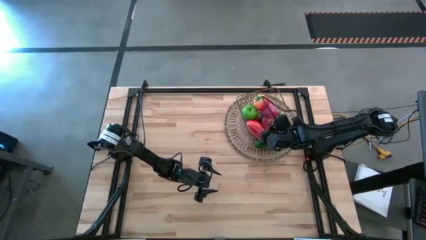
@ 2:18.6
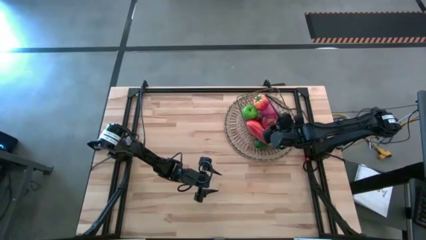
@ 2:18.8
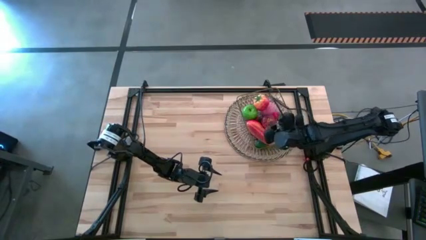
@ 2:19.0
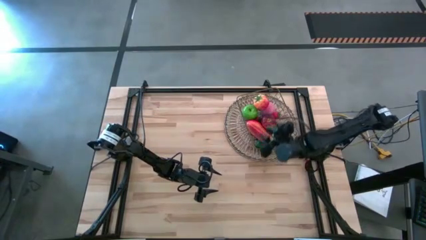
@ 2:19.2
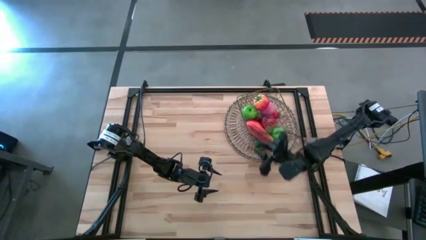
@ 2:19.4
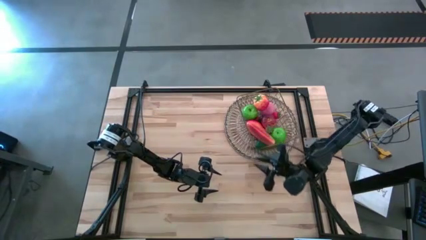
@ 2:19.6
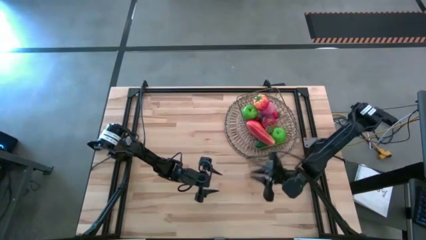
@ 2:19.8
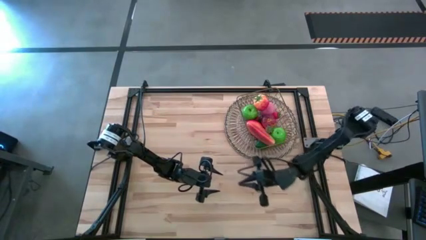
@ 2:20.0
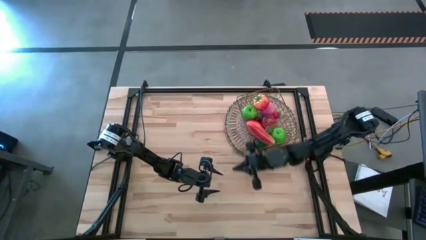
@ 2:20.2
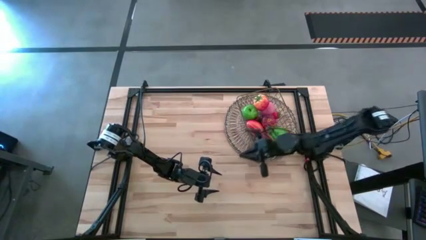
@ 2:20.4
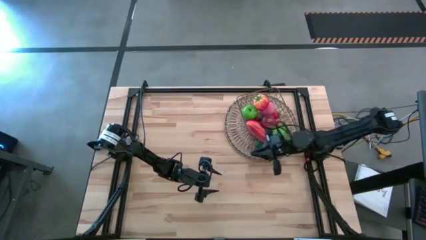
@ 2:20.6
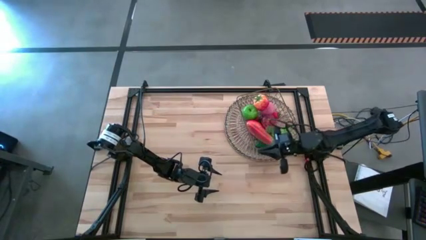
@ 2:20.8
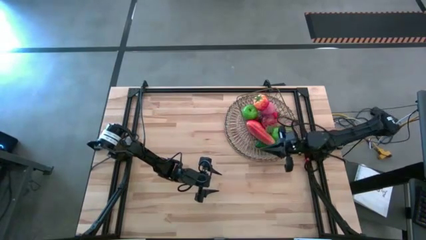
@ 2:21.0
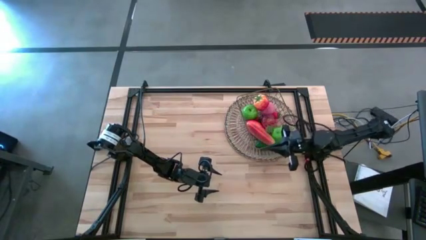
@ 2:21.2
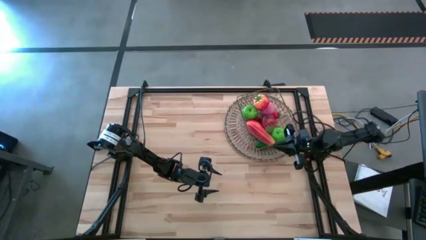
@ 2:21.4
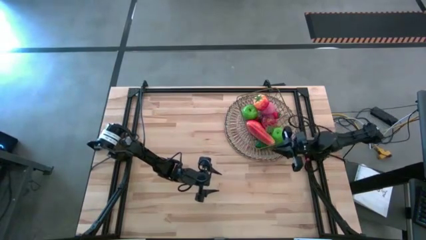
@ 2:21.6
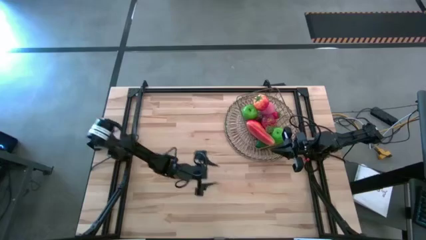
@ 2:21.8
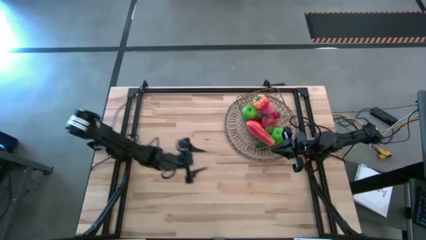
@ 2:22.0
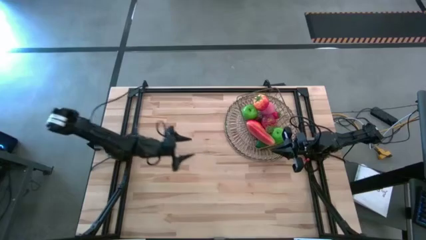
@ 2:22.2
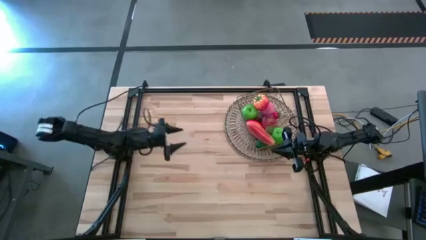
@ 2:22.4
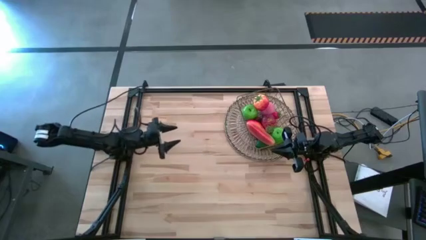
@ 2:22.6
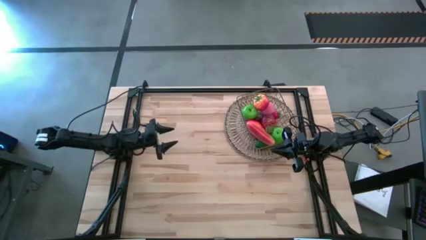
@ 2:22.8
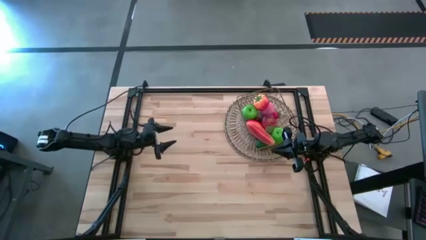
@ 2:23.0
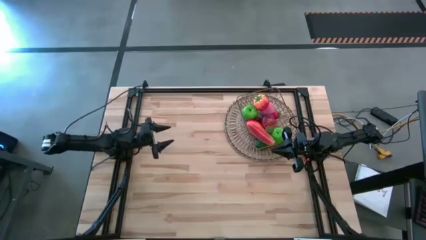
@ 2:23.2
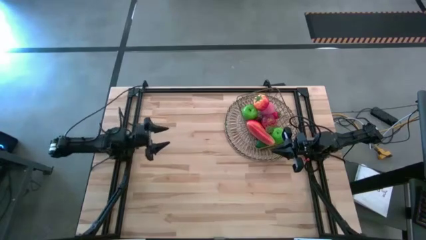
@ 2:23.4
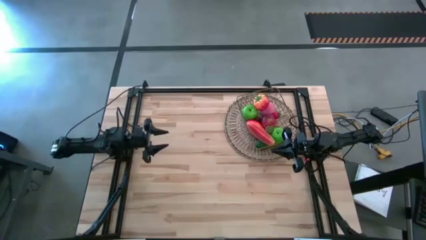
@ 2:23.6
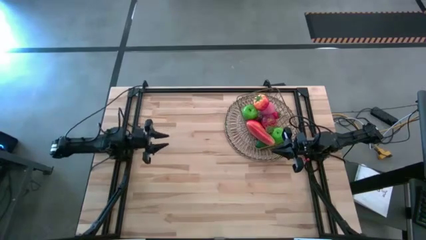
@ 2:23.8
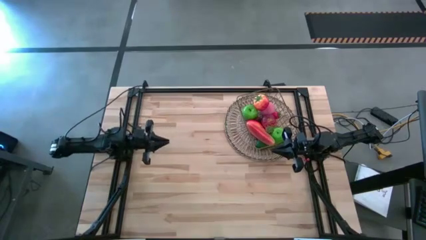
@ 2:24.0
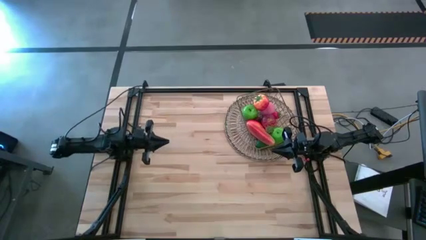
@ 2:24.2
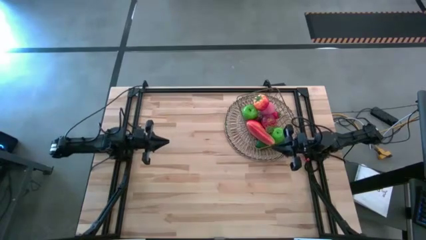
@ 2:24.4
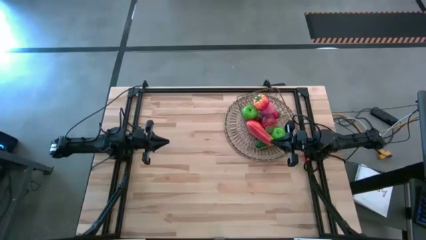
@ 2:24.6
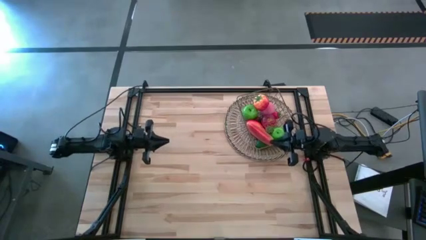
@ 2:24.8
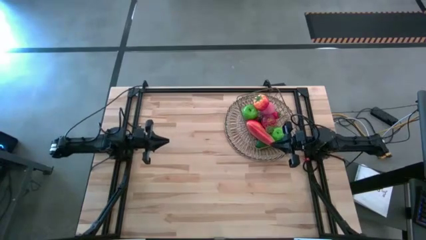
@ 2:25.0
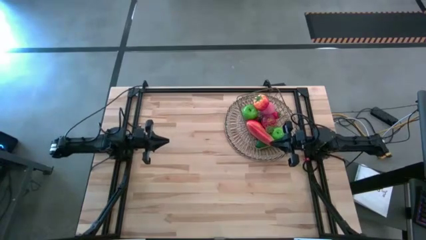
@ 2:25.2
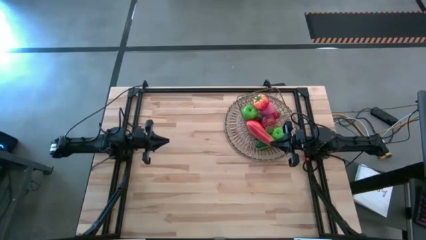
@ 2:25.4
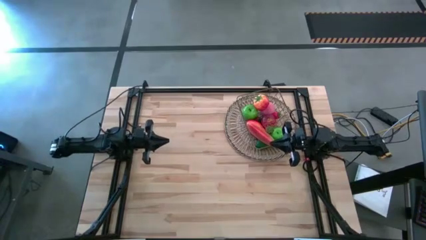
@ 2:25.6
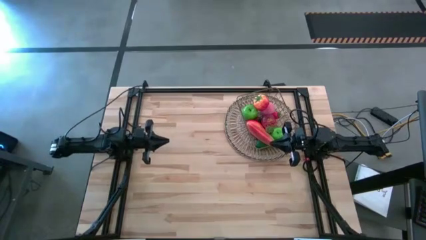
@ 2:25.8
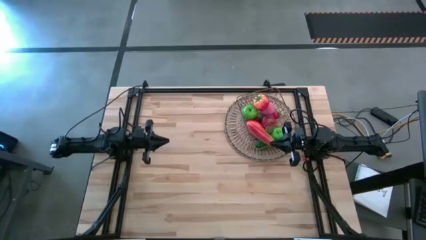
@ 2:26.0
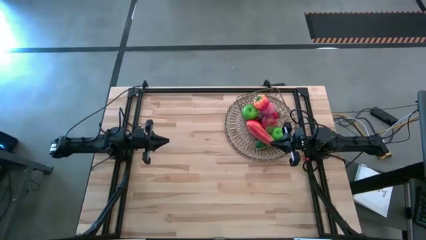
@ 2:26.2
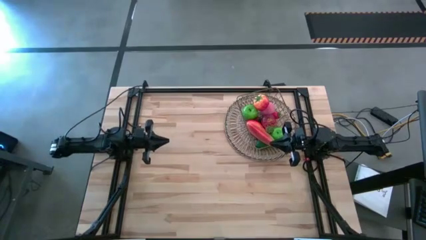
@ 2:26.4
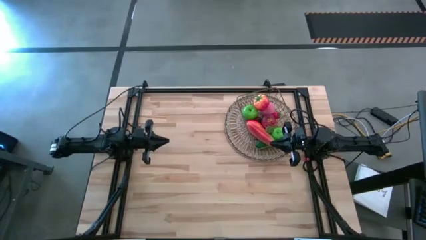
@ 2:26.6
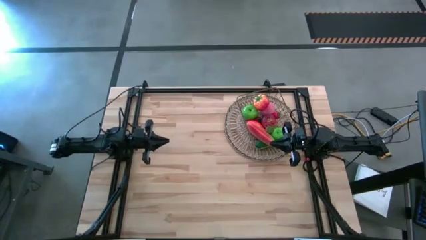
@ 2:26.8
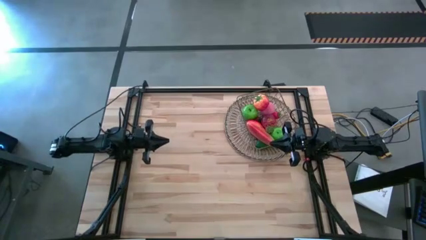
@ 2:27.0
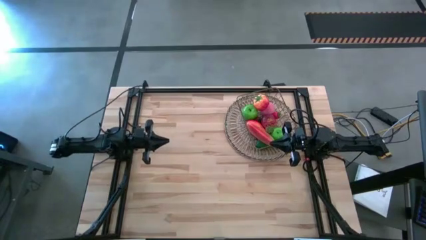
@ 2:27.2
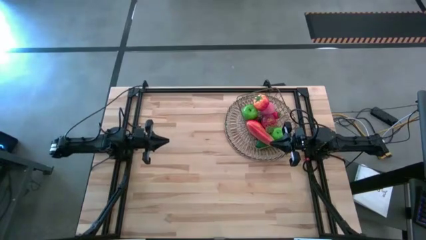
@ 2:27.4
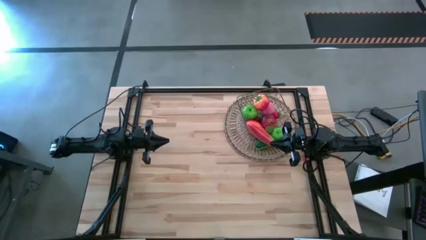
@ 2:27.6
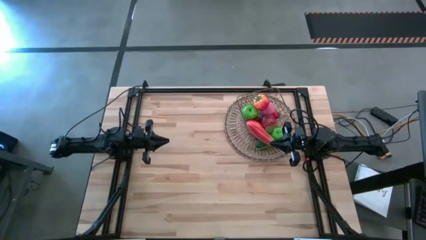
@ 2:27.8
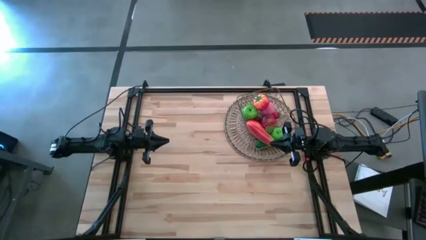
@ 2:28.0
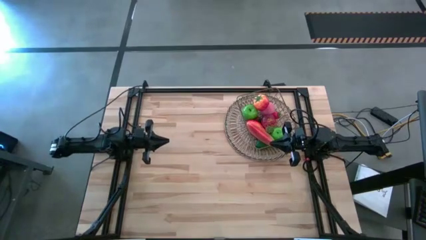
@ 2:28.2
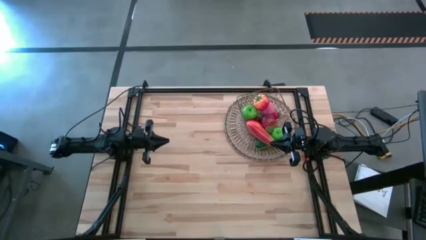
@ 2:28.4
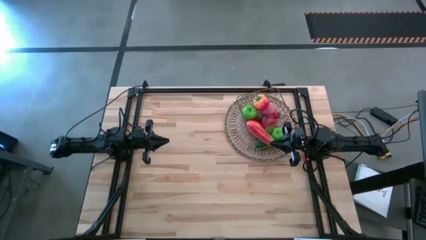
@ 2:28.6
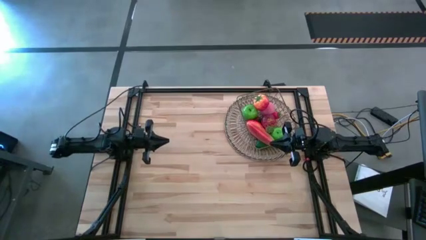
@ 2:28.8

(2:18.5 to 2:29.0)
Task: Build produce basket
Return to Home Position
